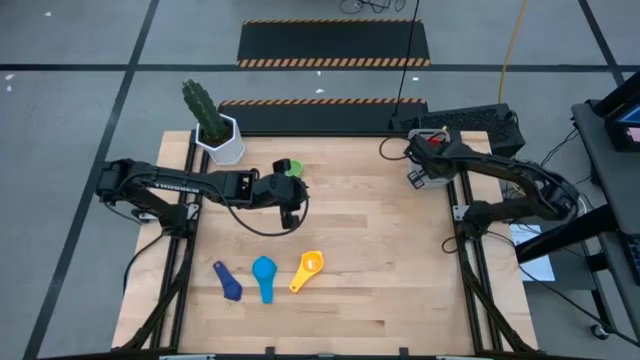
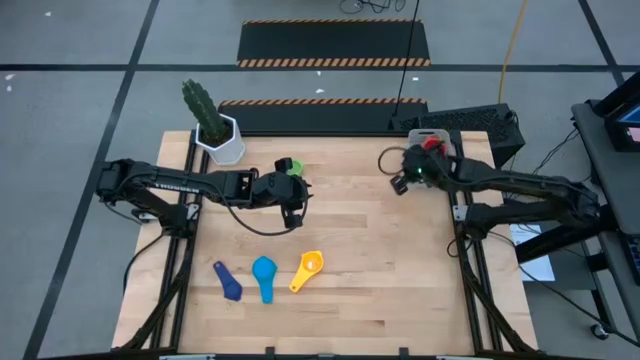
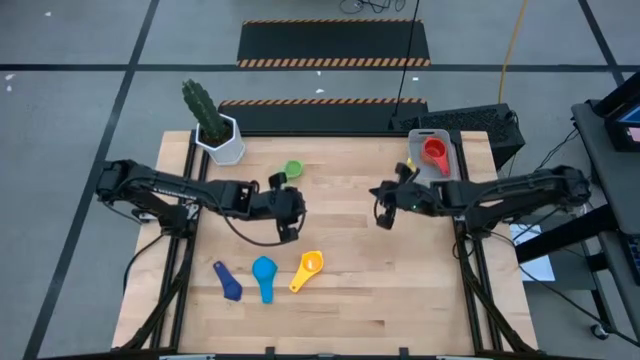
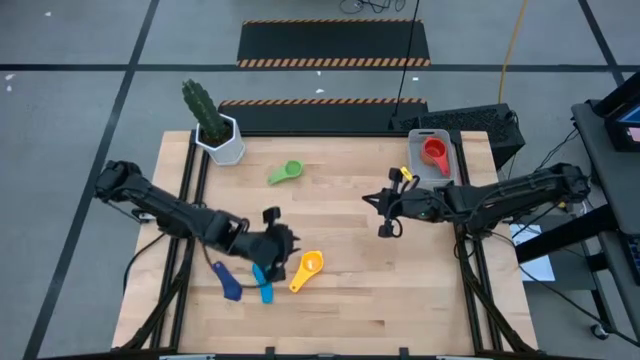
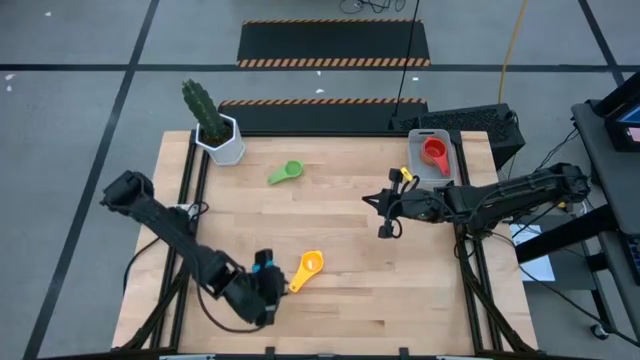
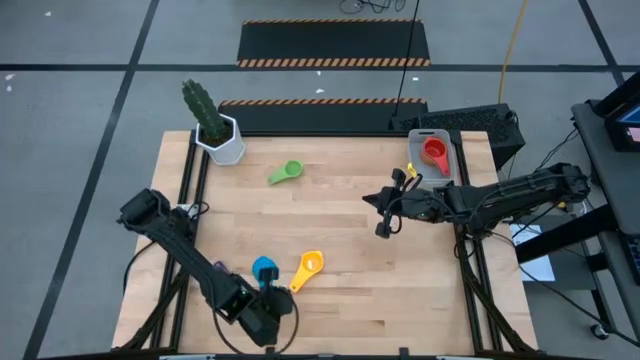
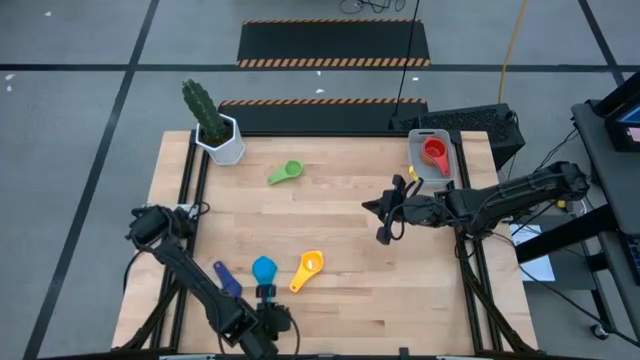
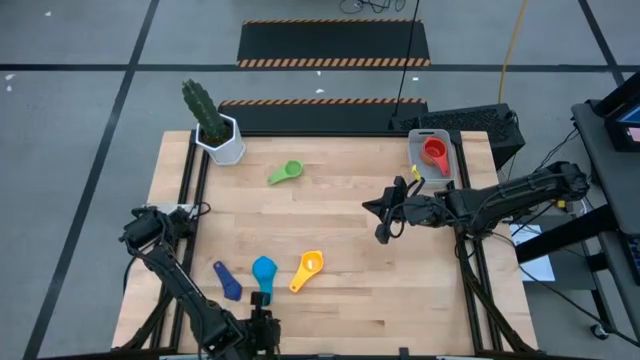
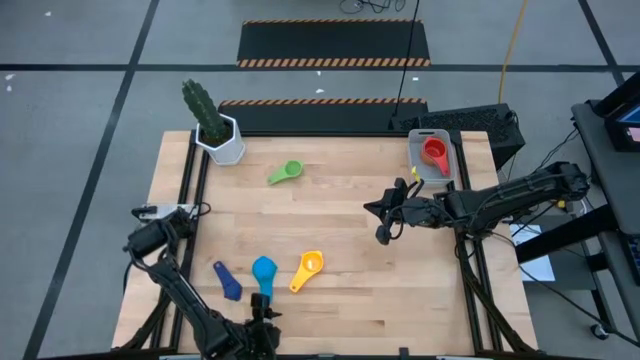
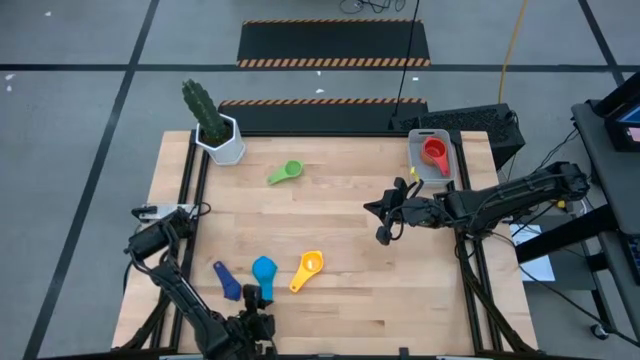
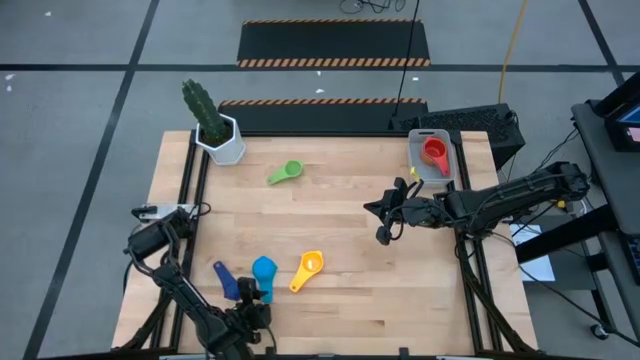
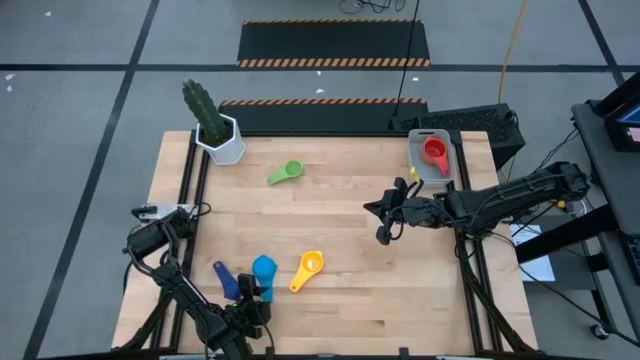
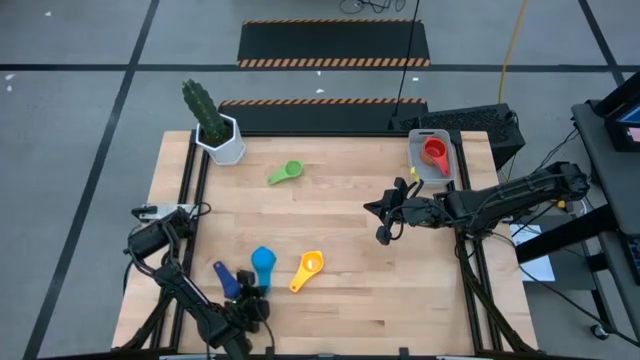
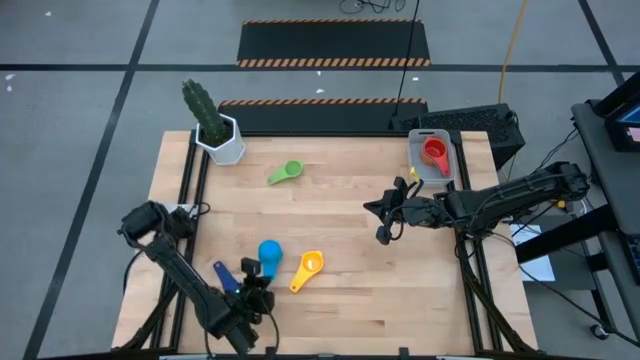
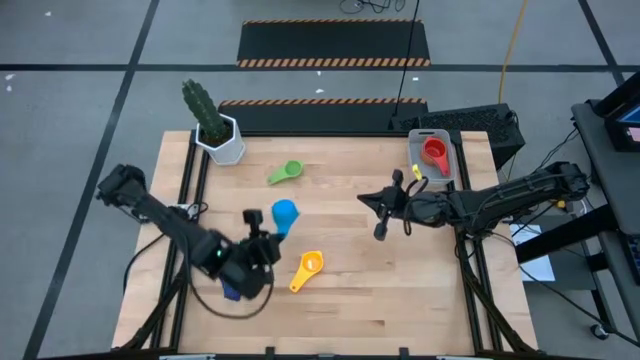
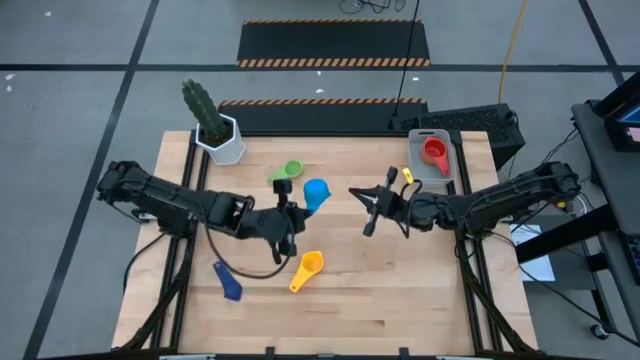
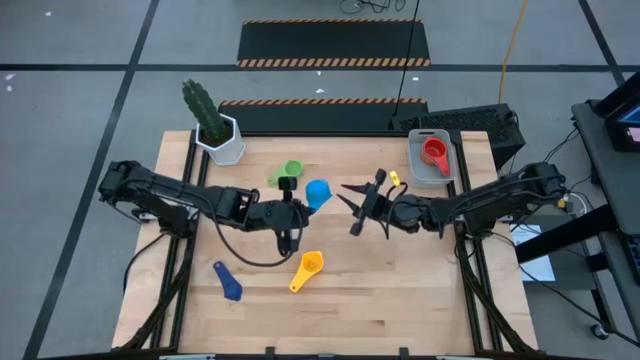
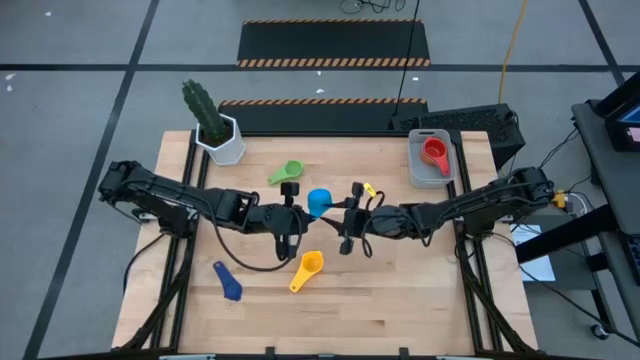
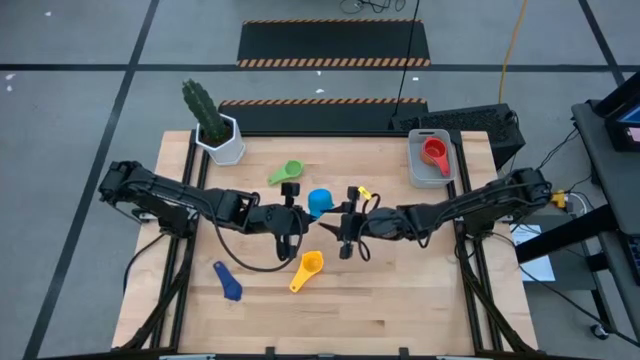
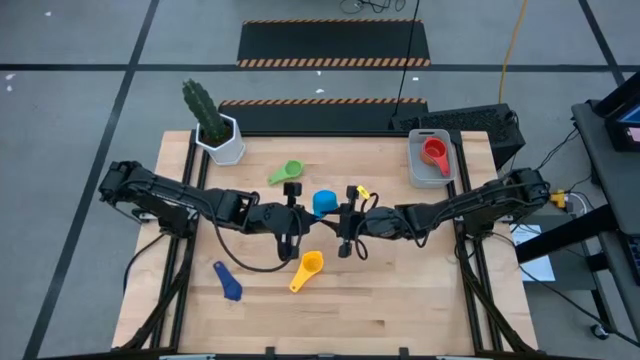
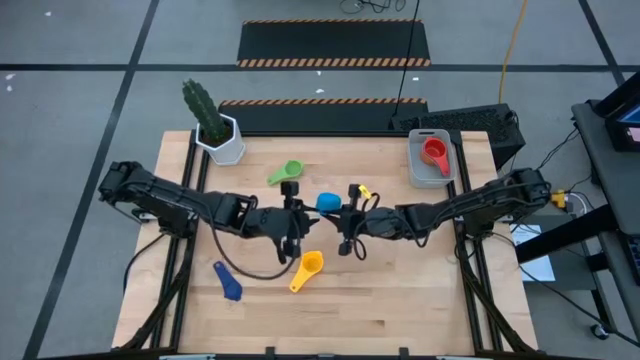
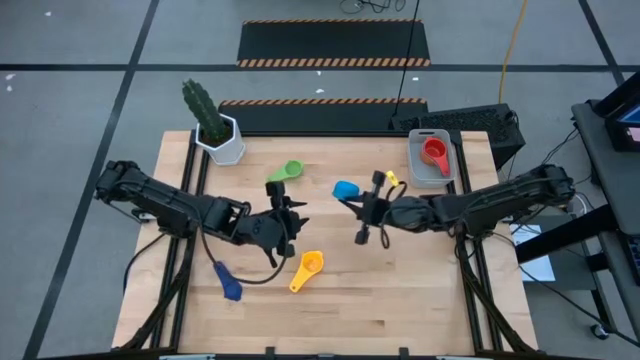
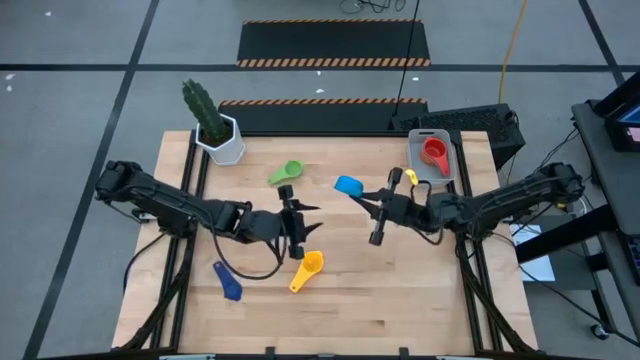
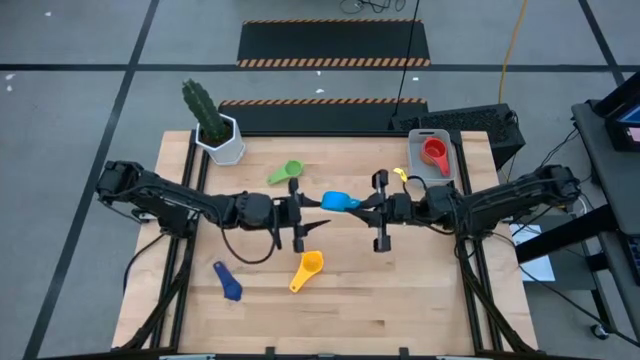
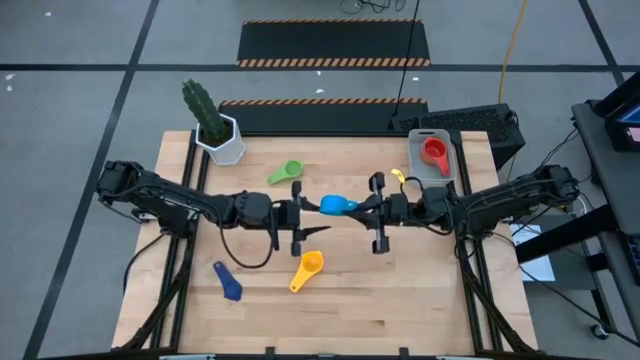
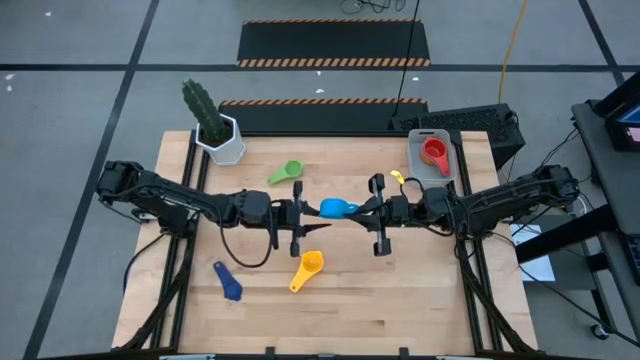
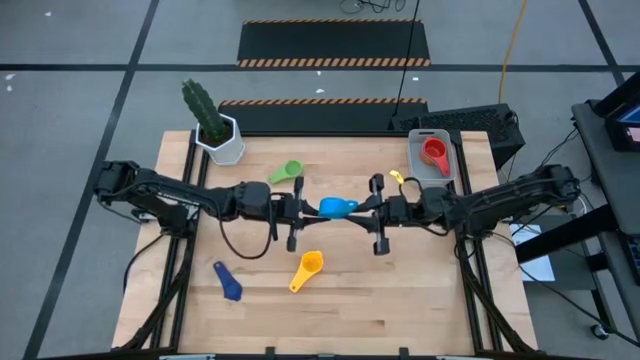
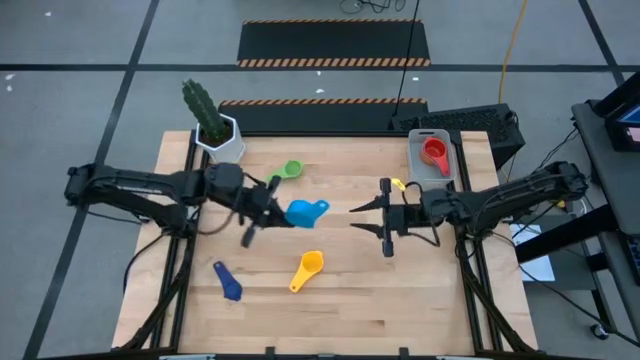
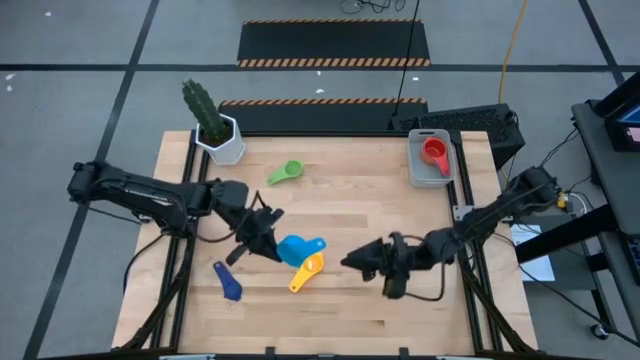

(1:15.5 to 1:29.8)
Task: Nest measuring cups in basket
Stack the light blue measuring cup on top of the orange measuring cup in the gray bin

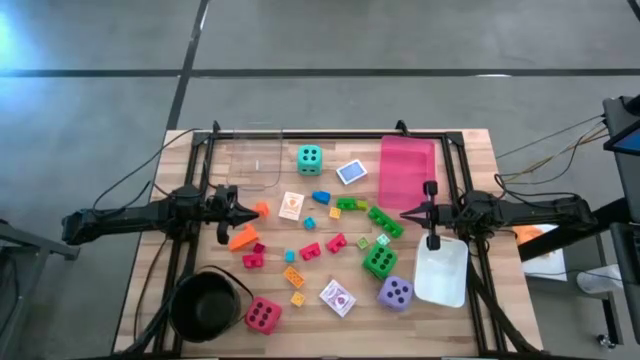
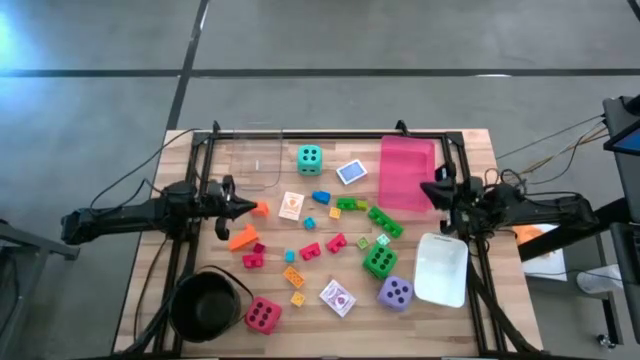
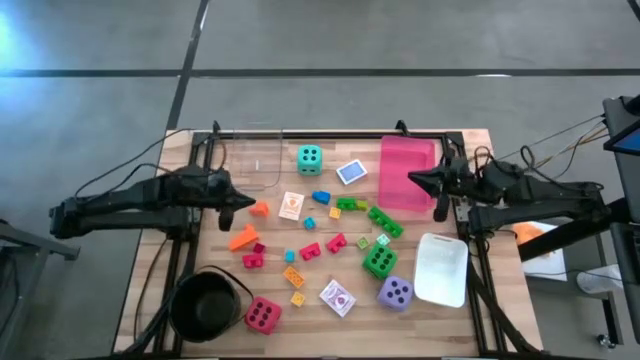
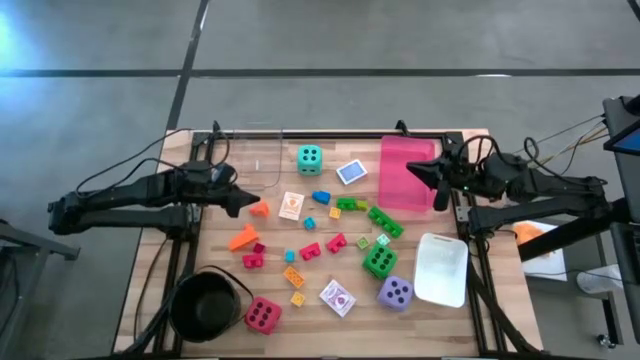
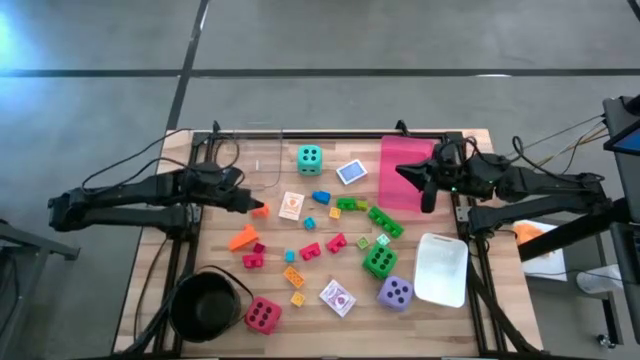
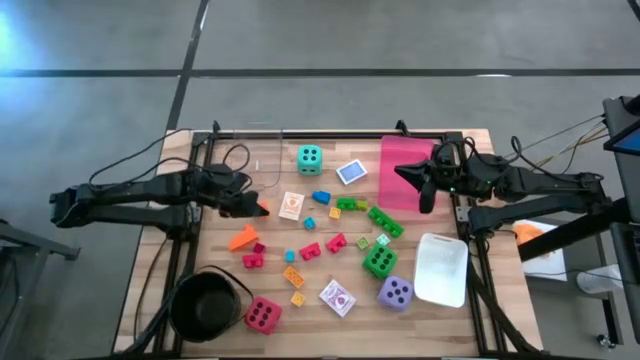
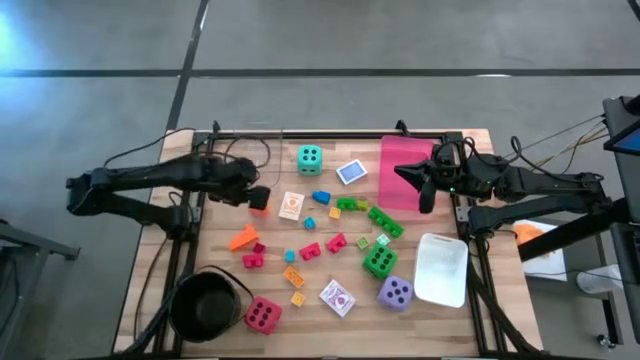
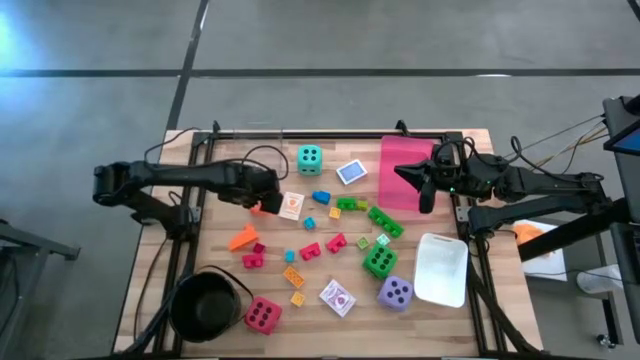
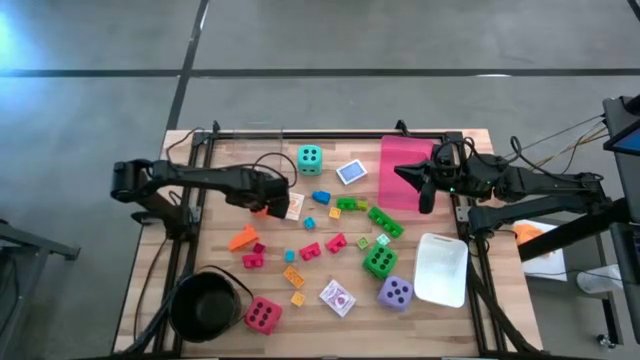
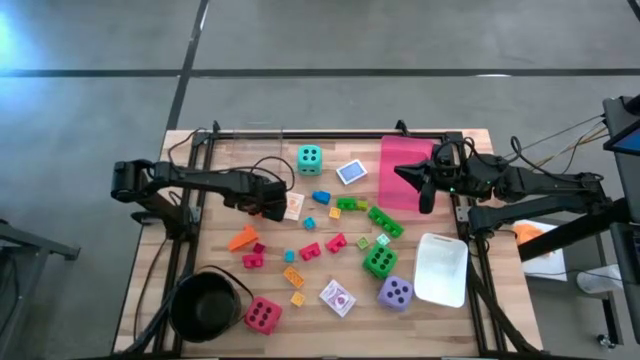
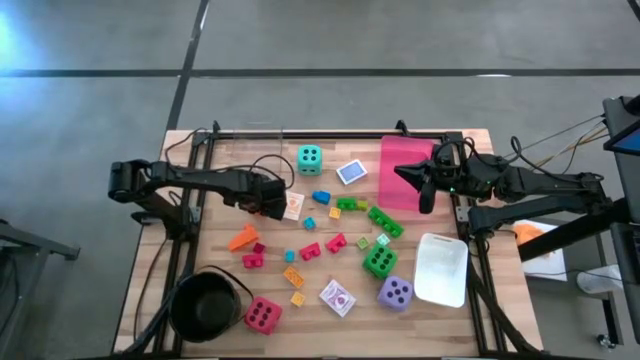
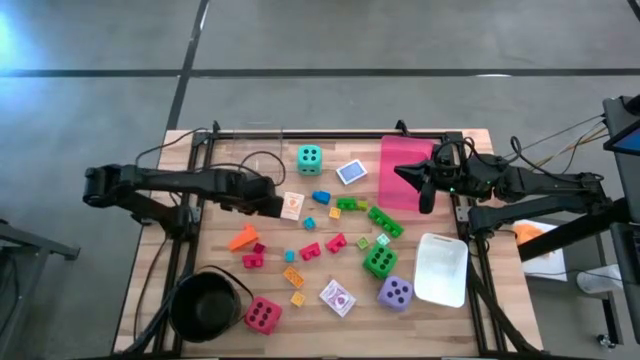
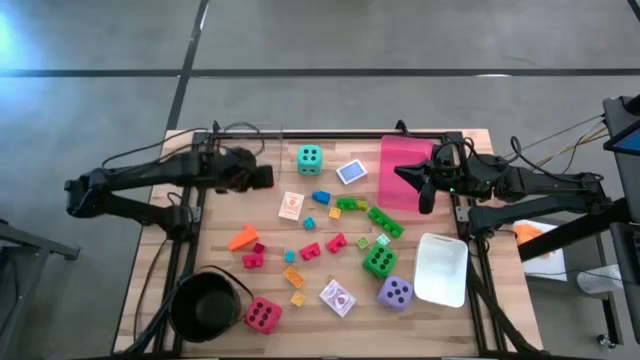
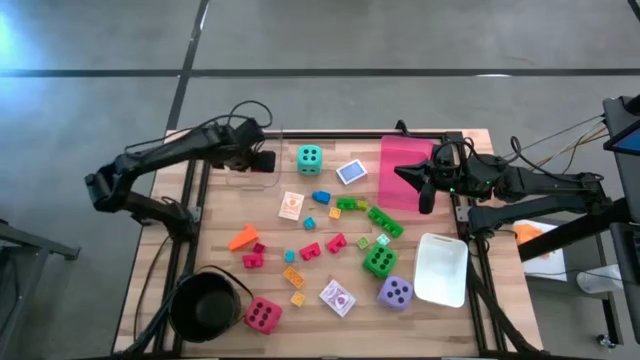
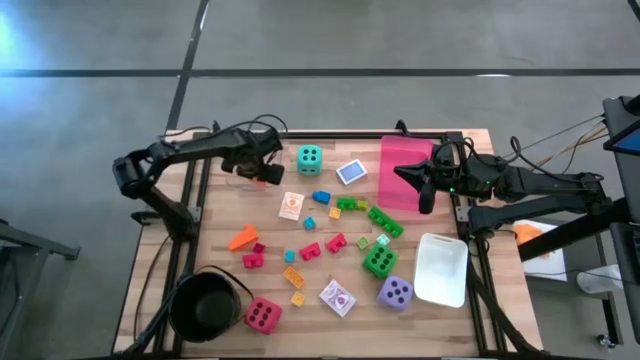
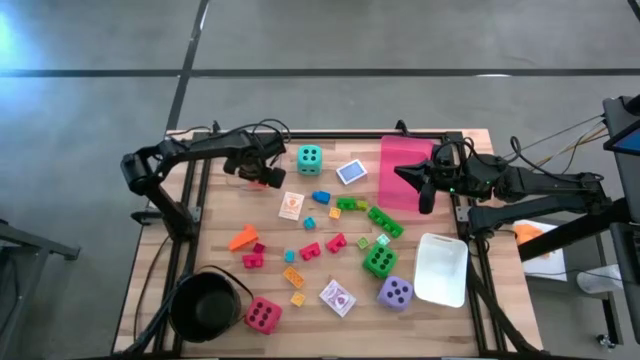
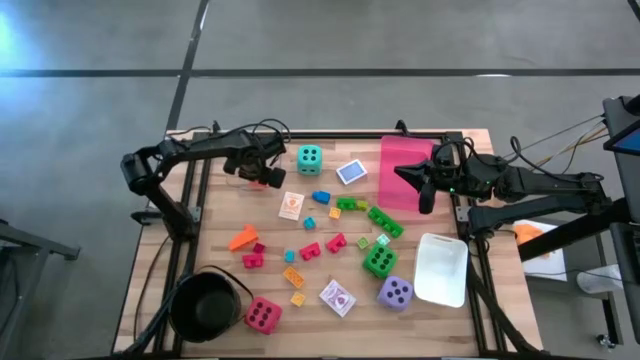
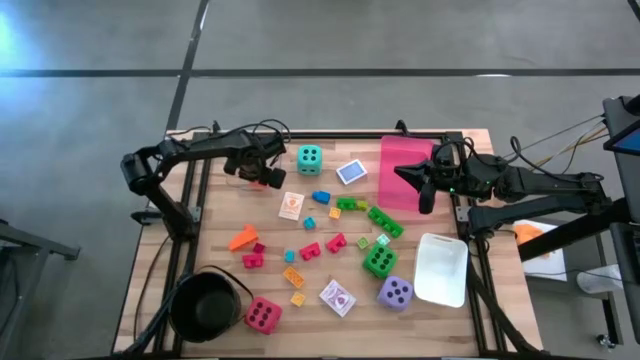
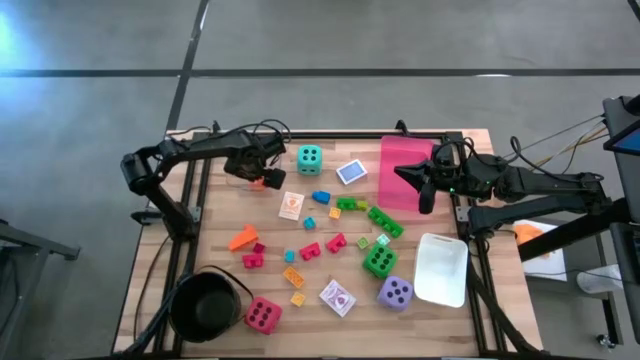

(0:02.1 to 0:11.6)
Task: Pick & Place Toys
Put the orange game piece into the transparent bin
